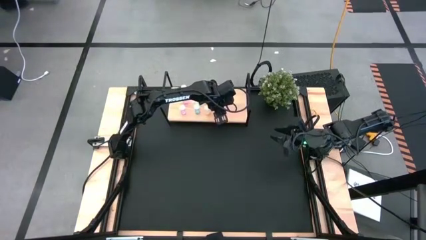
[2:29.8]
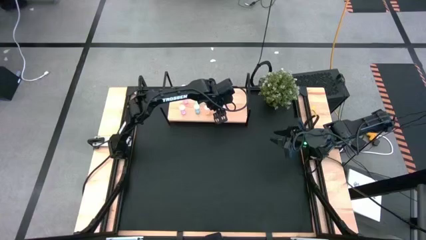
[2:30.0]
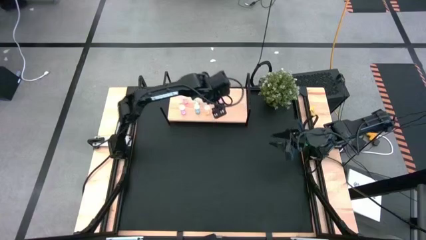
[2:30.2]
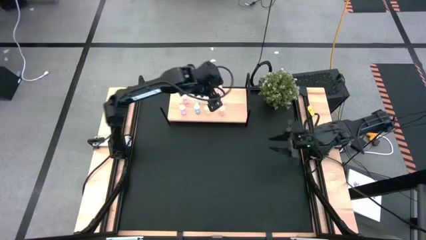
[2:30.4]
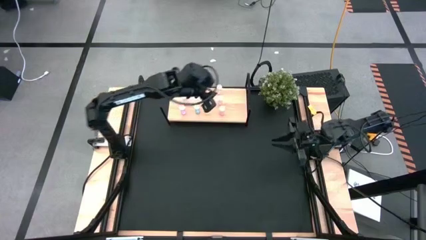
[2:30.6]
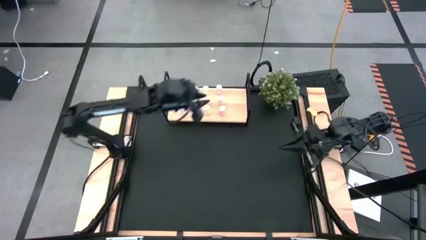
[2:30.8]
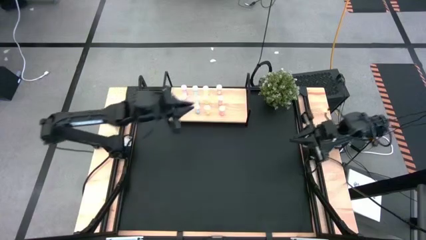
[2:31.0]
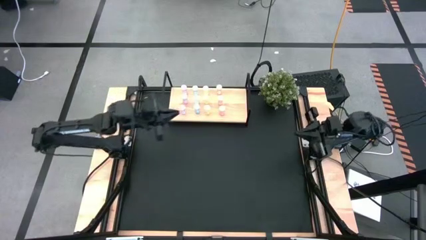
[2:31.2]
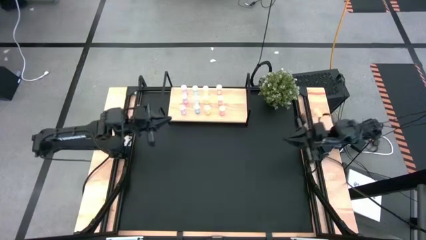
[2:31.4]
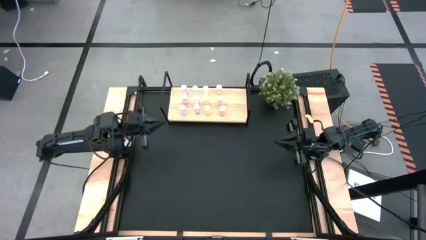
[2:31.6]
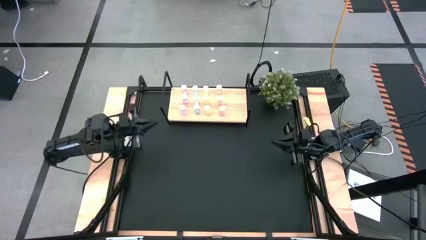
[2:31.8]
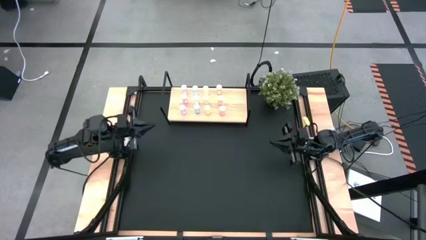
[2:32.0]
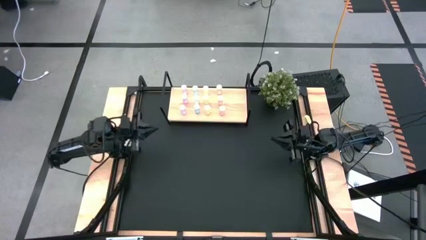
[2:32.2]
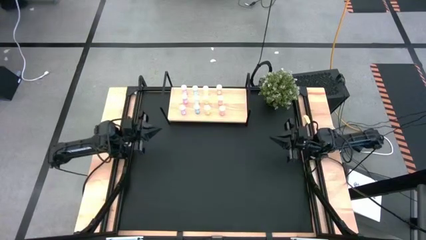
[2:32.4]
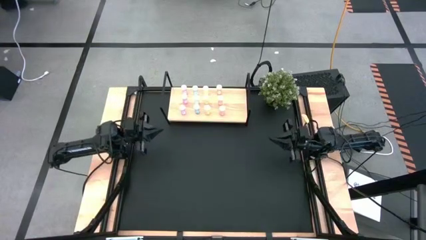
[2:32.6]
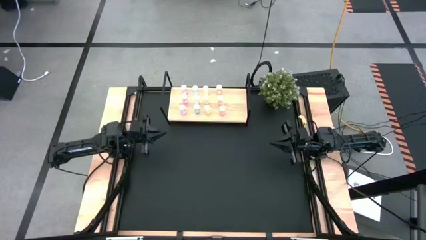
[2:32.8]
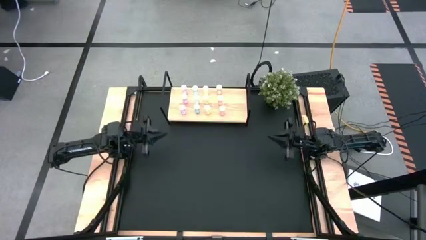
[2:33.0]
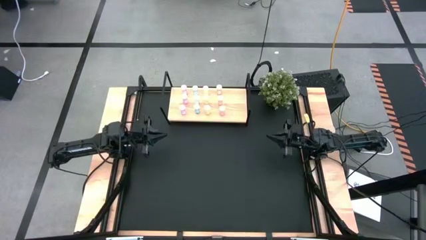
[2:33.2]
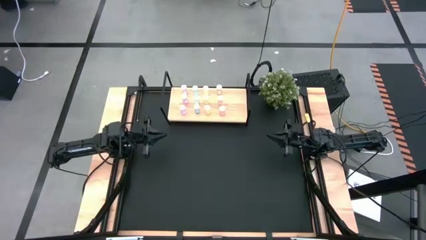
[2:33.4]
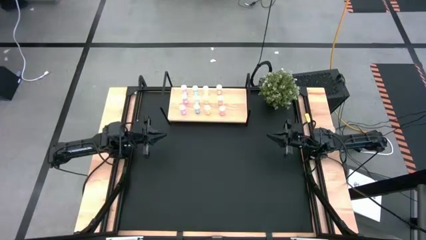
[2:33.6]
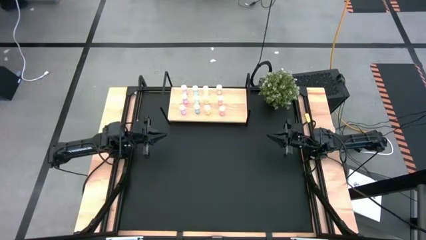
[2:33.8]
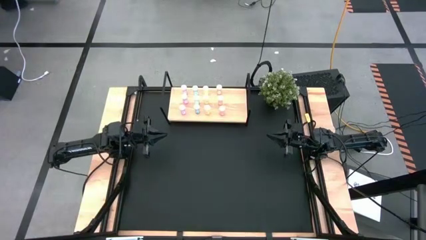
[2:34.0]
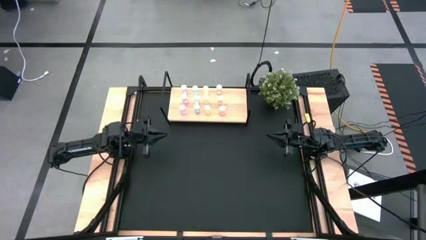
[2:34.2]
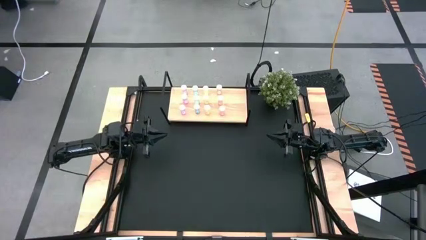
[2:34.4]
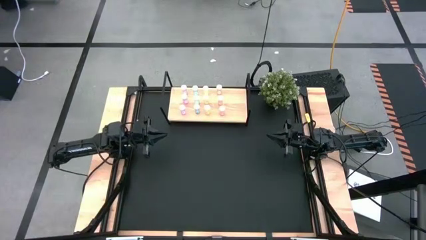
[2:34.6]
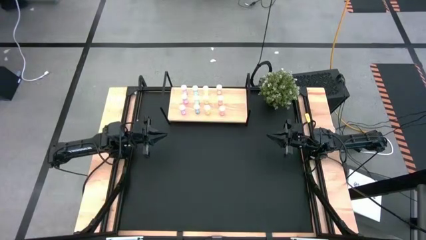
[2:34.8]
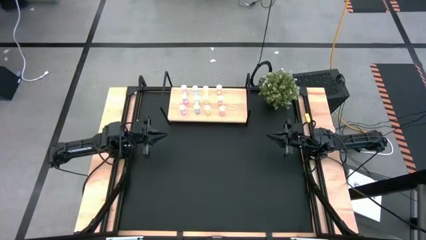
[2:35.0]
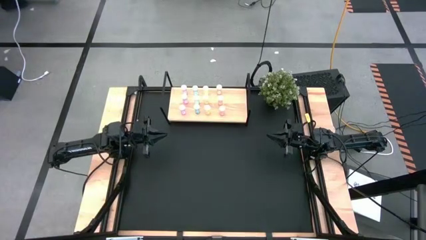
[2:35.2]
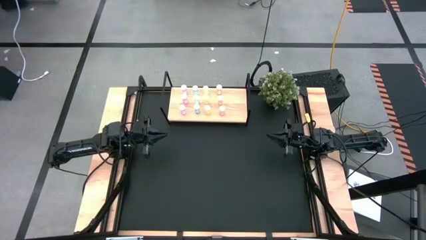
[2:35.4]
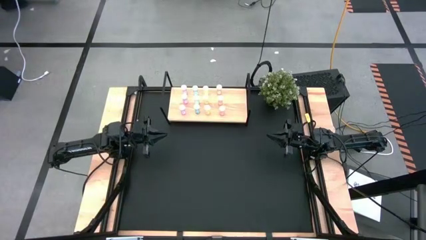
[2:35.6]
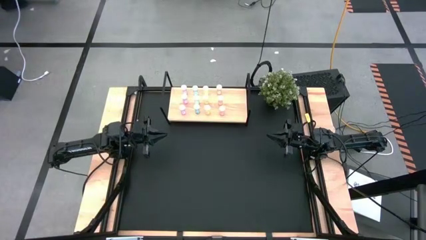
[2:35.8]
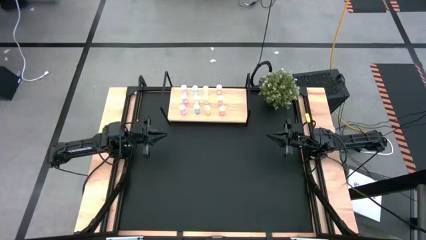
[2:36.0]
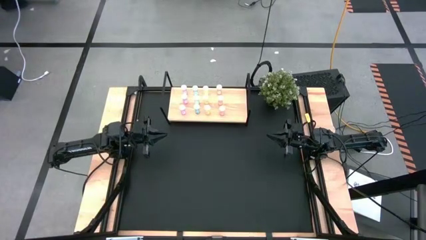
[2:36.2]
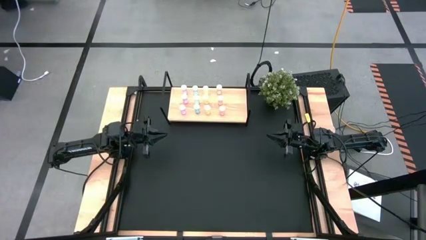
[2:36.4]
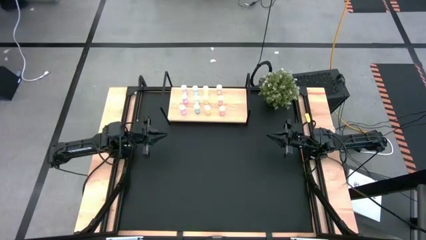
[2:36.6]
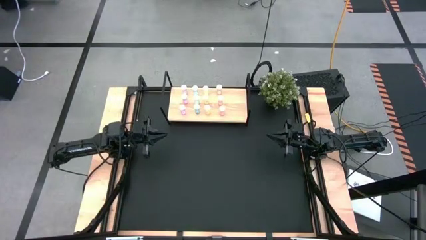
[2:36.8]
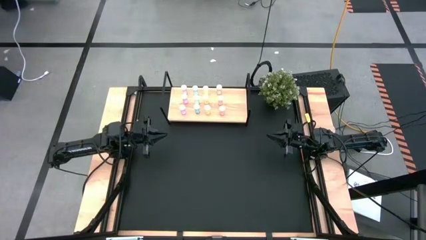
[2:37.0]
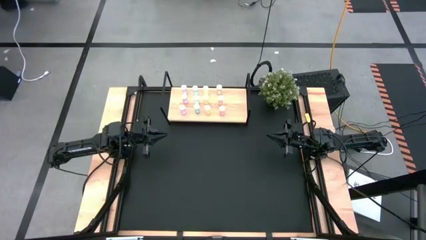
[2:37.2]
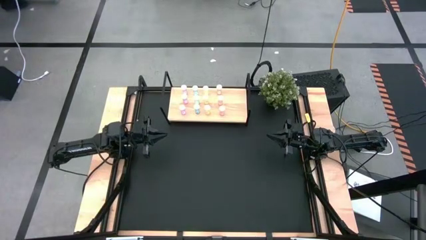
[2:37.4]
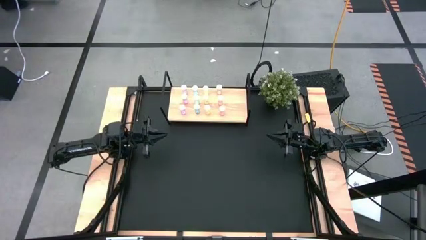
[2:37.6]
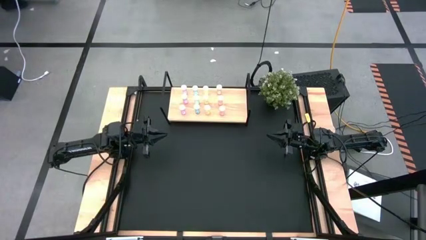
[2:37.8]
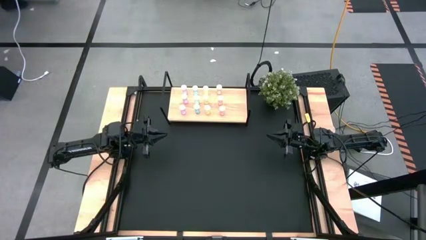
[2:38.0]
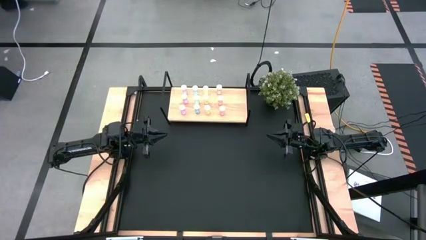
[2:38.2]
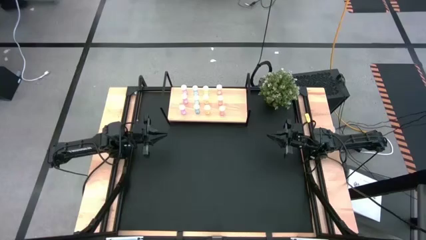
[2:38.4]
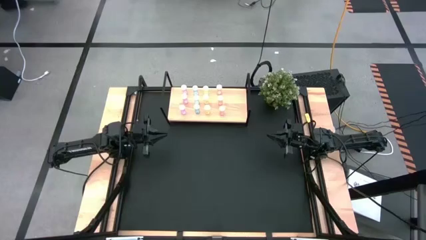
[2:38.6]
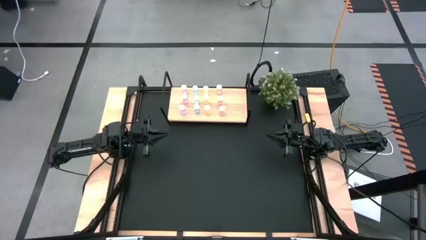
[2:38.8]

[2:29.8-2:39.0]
Task: Pick and place medicine bottles onto shelf by color
Return to Home Position

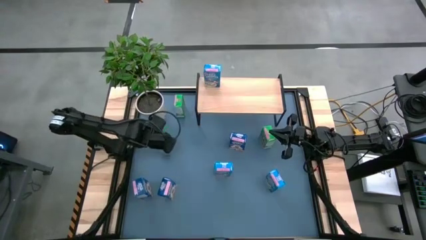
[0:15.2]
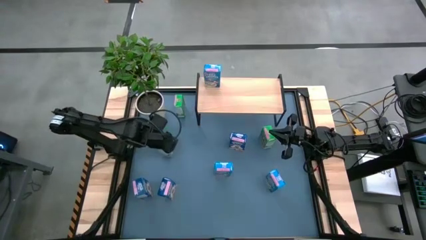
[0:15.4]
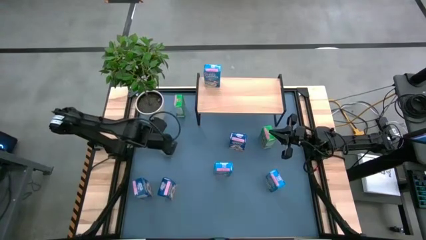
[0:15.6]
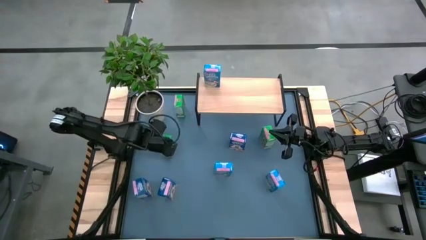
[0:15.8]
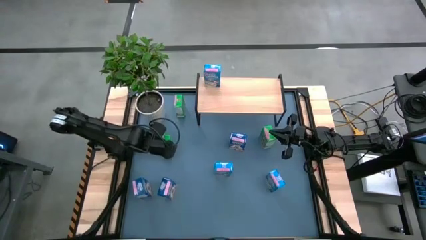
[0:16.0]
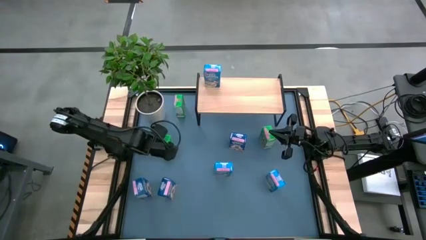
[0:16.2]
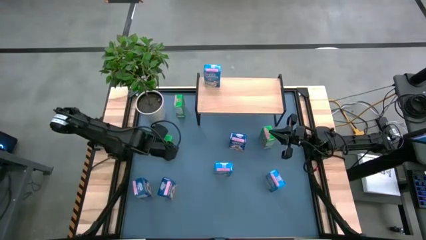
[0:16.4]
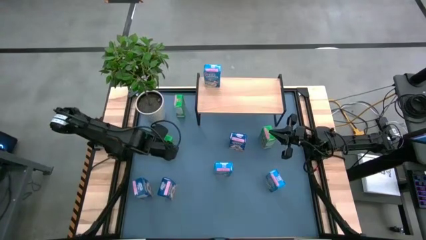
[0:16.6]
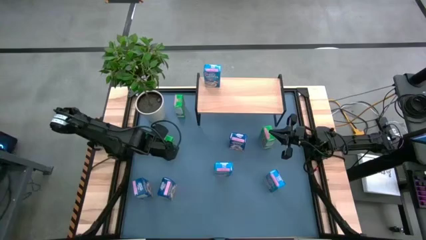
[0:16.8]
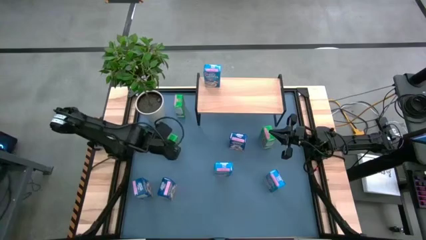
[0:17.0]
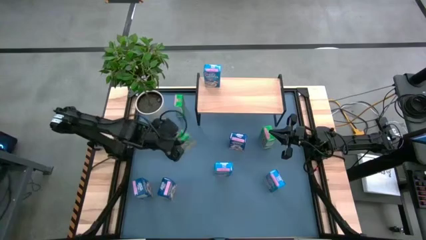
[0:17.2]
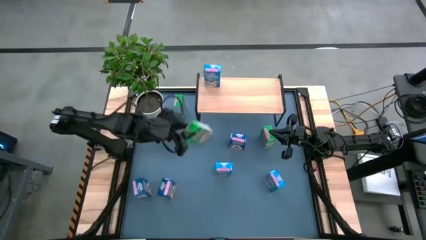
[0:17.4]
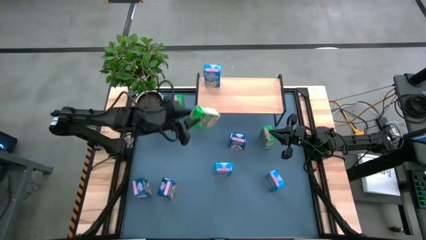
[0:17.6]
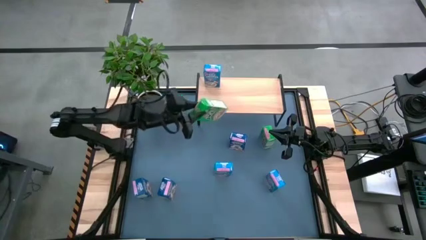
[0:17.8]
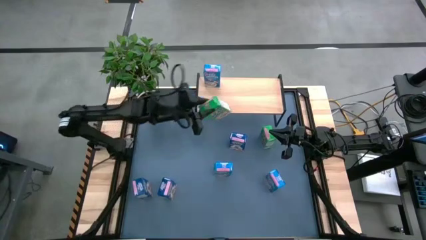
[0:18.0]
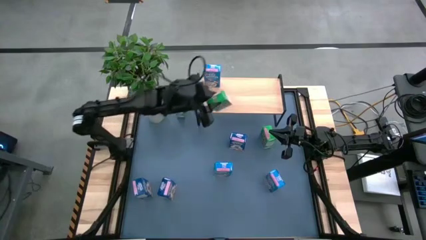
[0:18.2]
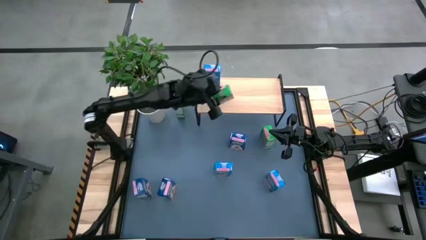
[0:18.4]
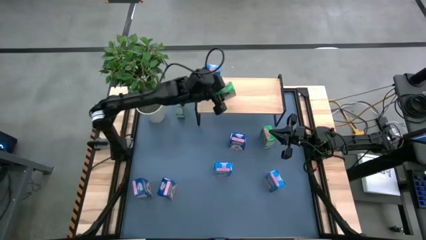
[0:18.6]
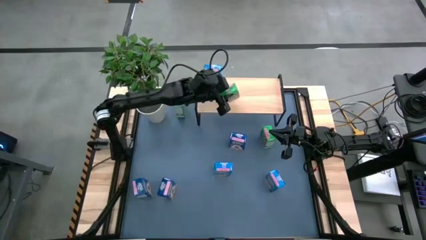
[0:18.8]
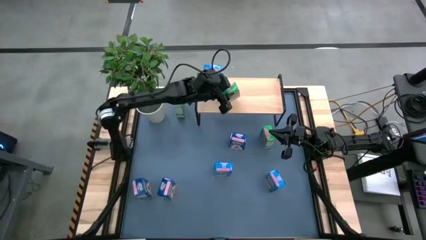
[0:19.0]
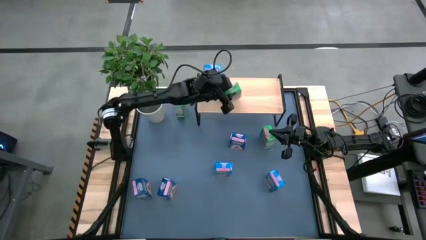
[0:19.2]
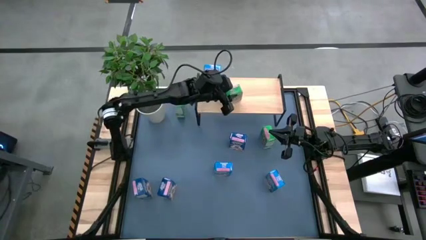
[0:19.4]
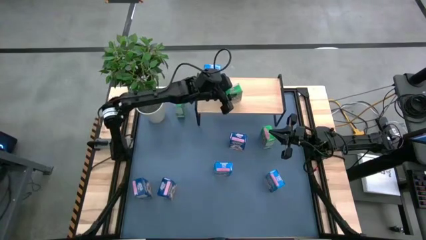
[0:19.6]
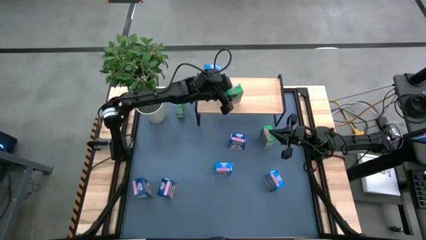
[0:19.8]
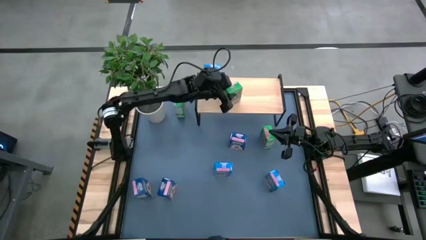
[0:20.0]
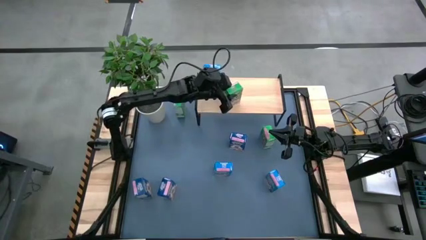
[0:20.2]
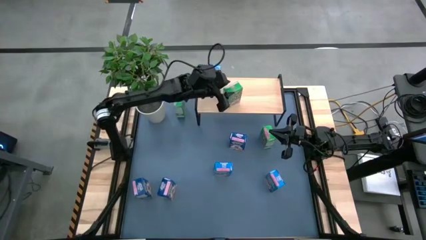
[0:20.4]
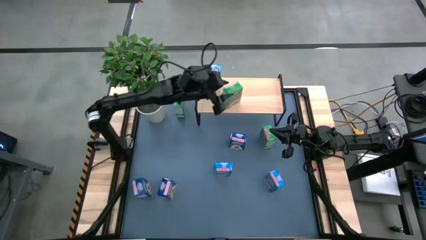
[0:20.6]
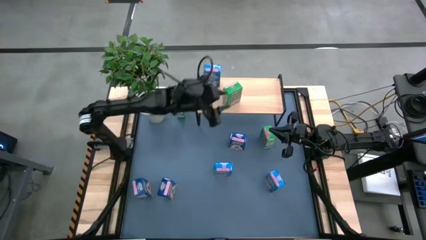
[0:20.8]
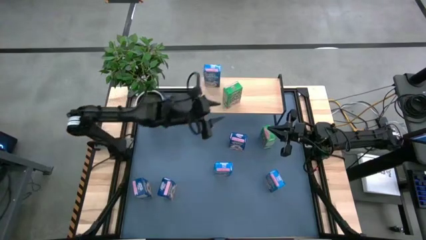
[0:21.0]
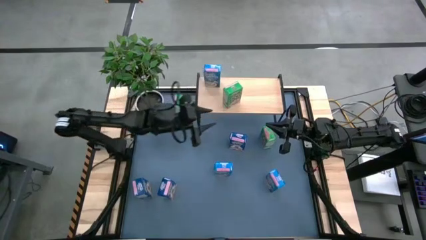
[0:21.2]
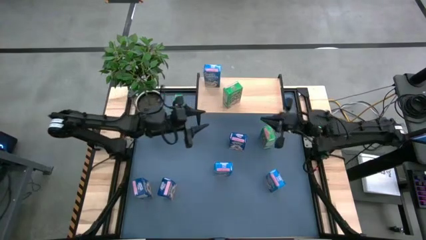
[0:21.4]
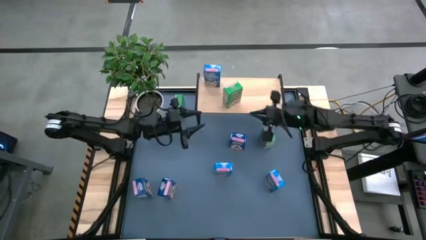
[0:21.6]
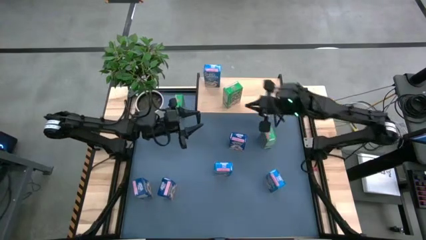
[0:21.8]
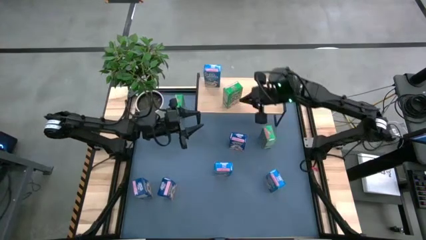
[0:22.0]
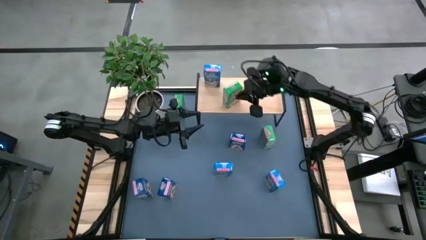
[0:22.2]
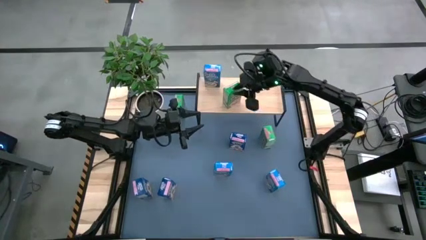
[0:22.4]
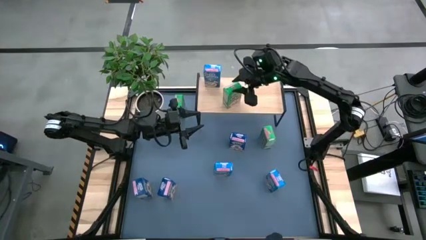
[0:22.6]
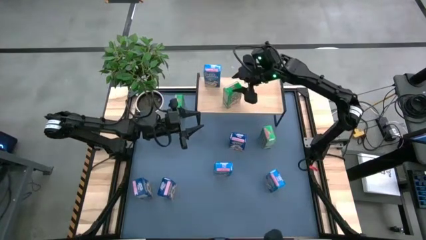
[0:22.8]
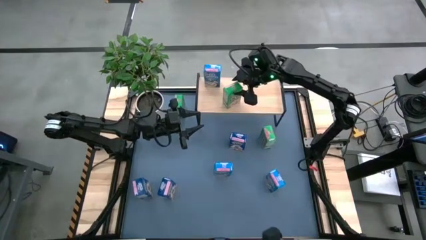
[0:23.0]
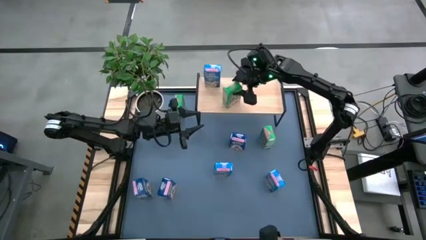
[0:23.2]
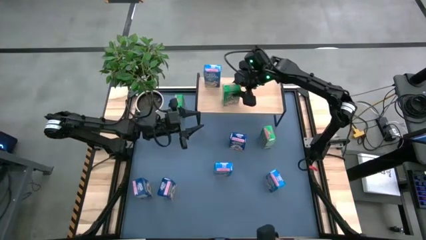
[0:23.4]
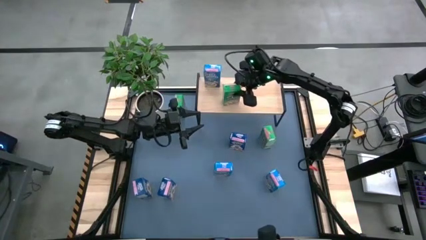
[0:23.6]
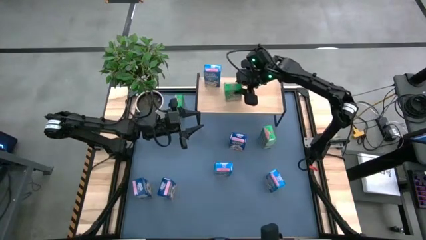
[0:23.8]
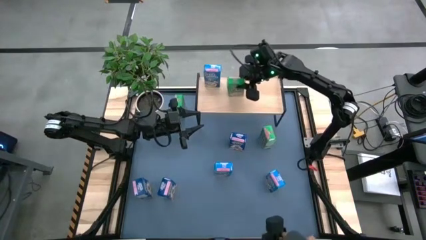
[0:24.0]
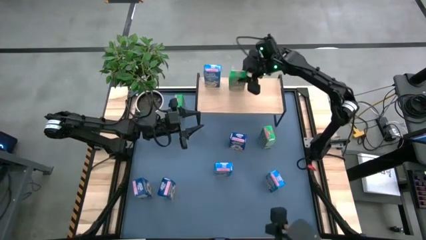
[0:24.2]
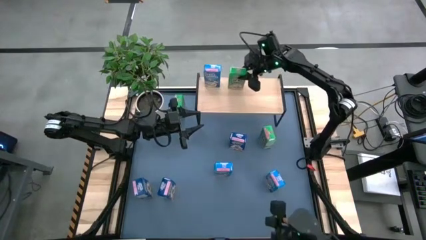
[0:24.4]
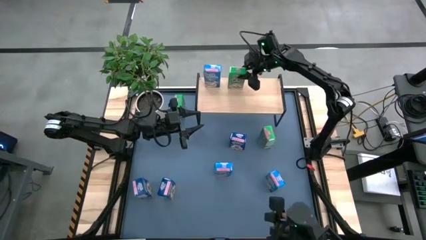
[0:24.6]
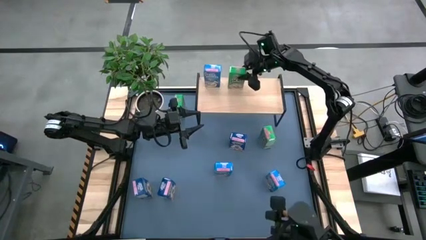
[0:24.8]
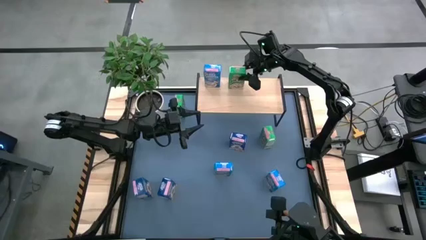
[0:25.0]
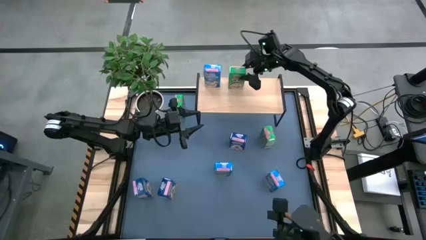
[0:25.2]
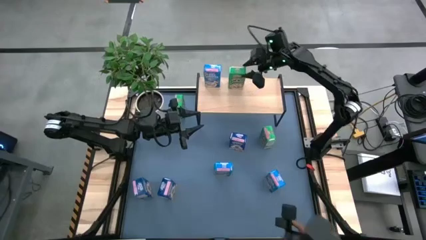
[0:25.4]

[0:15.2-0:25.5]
Task: Stack cereal on shelf
Put the bottom left green cereal box on the shelf
